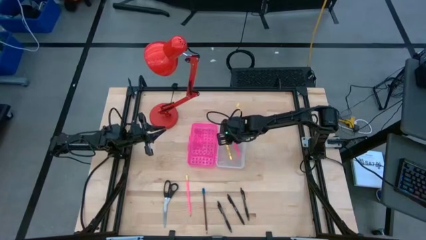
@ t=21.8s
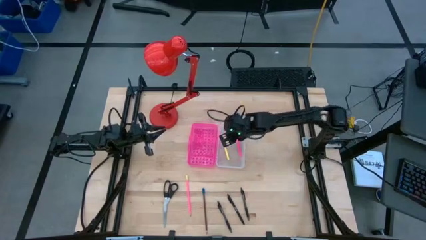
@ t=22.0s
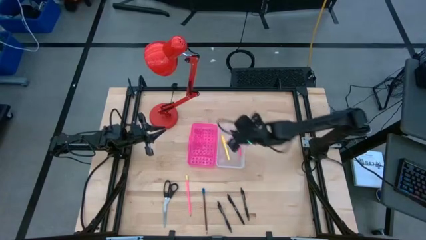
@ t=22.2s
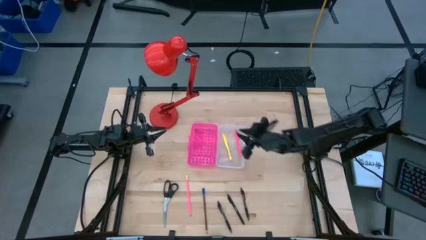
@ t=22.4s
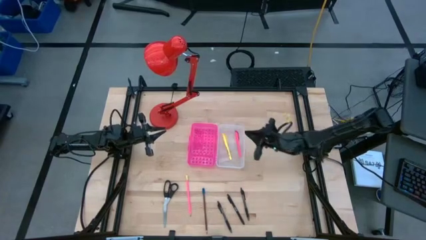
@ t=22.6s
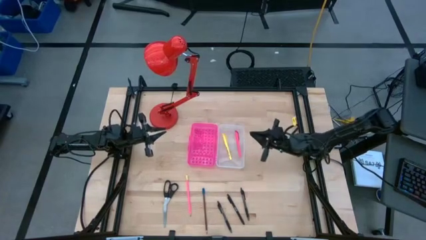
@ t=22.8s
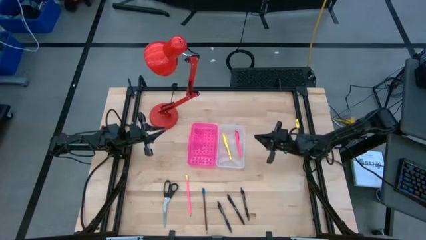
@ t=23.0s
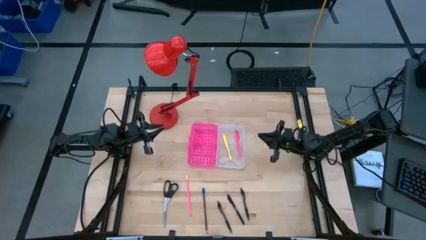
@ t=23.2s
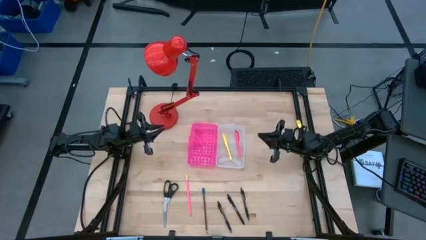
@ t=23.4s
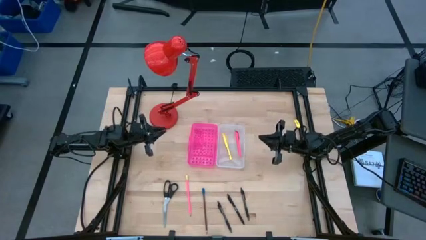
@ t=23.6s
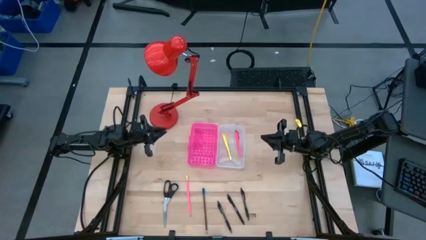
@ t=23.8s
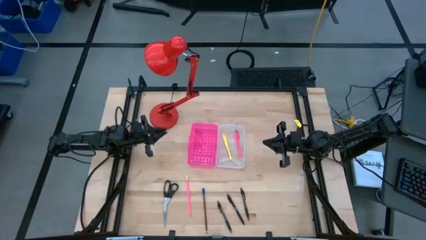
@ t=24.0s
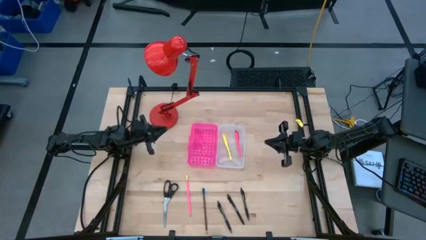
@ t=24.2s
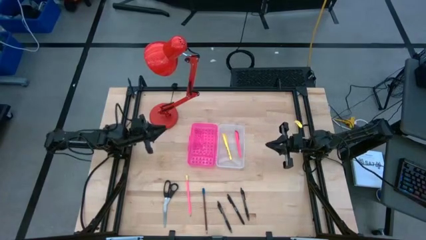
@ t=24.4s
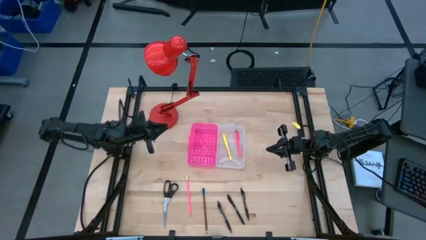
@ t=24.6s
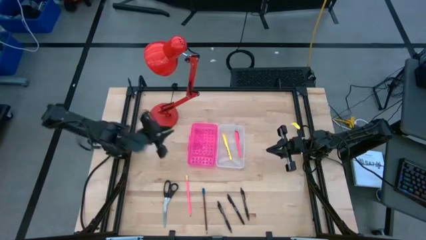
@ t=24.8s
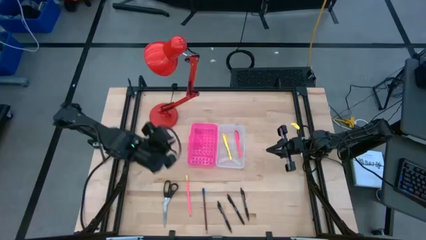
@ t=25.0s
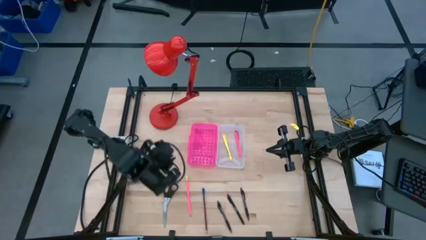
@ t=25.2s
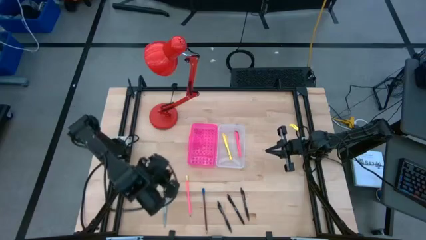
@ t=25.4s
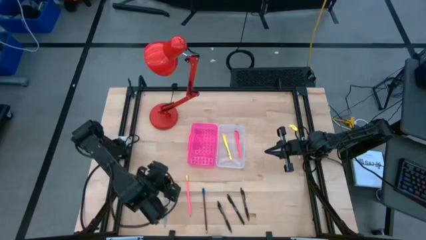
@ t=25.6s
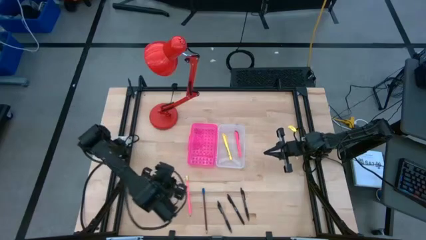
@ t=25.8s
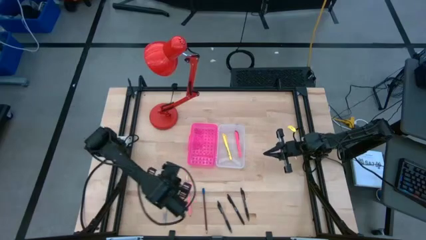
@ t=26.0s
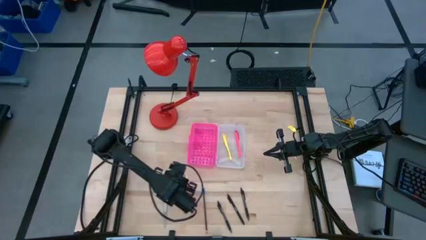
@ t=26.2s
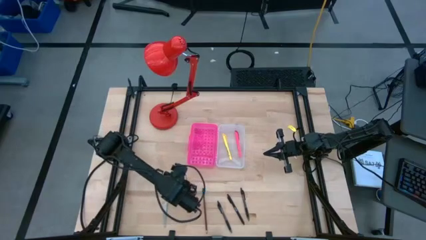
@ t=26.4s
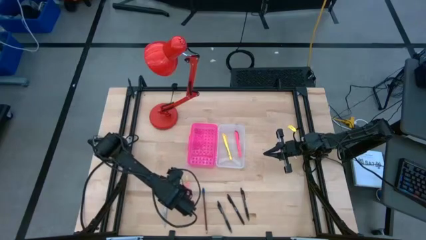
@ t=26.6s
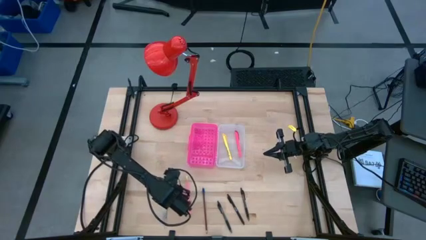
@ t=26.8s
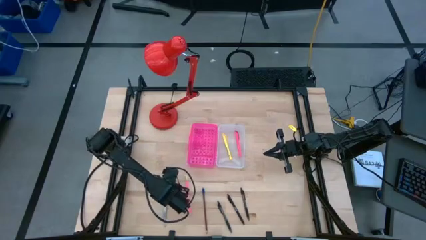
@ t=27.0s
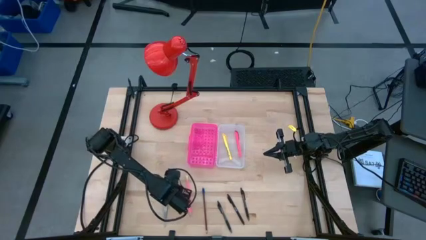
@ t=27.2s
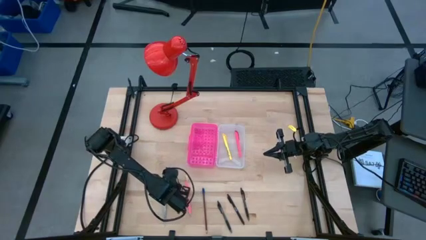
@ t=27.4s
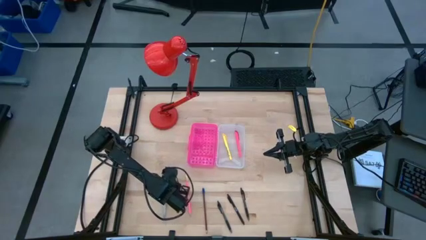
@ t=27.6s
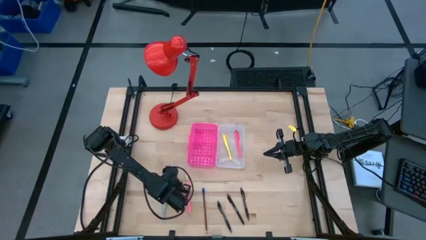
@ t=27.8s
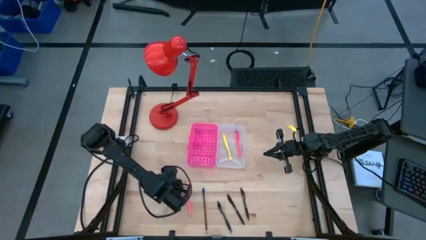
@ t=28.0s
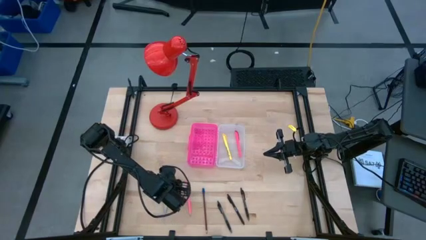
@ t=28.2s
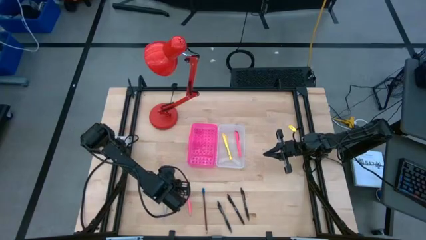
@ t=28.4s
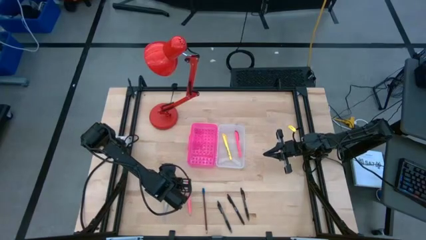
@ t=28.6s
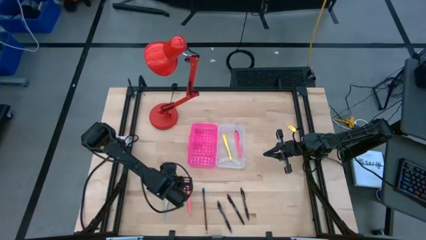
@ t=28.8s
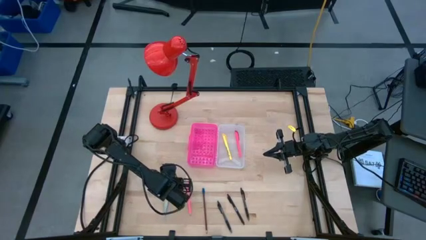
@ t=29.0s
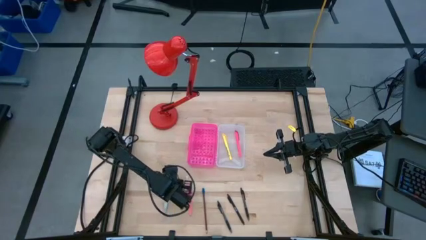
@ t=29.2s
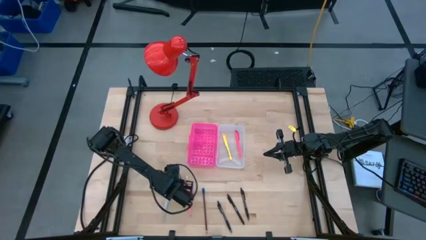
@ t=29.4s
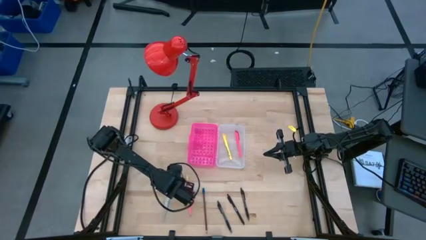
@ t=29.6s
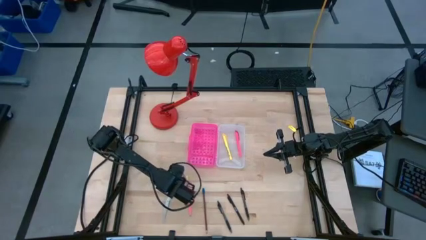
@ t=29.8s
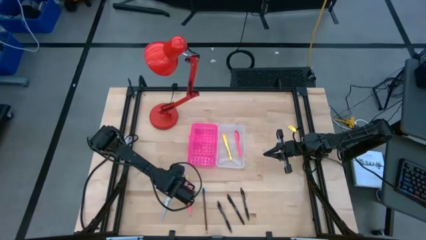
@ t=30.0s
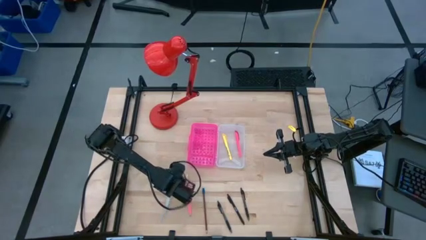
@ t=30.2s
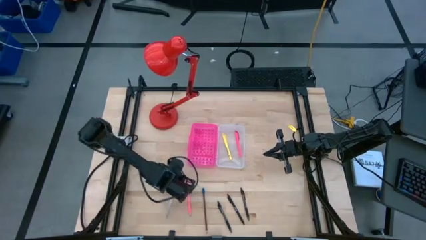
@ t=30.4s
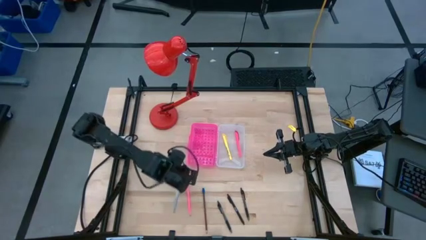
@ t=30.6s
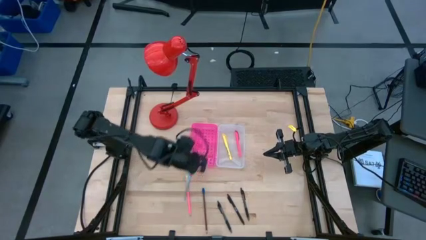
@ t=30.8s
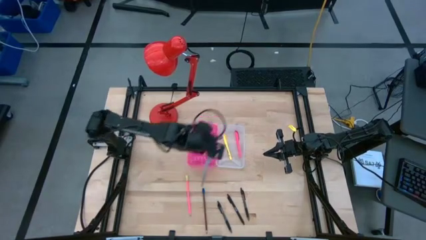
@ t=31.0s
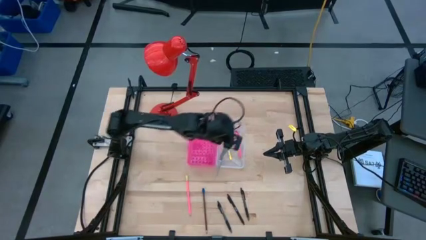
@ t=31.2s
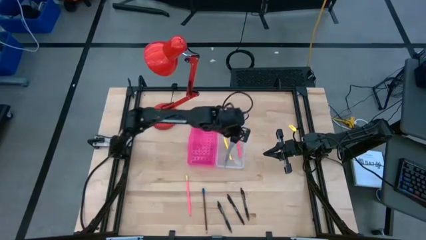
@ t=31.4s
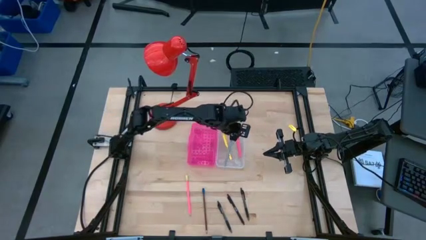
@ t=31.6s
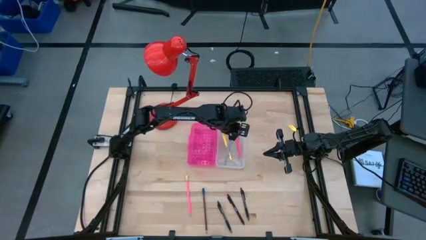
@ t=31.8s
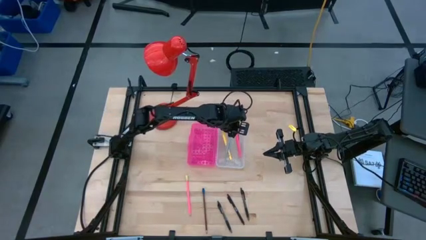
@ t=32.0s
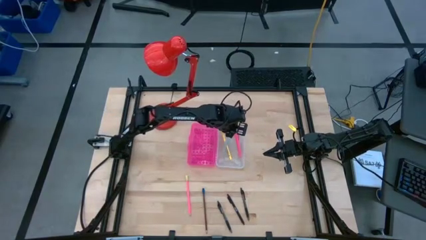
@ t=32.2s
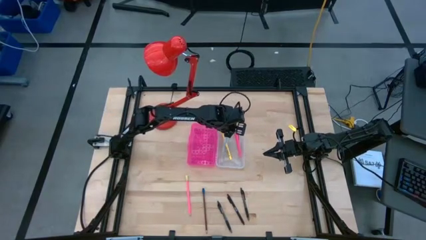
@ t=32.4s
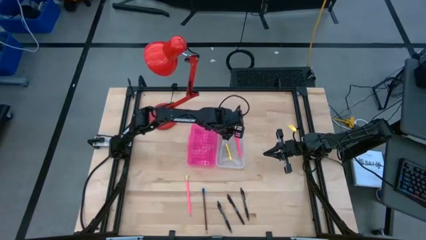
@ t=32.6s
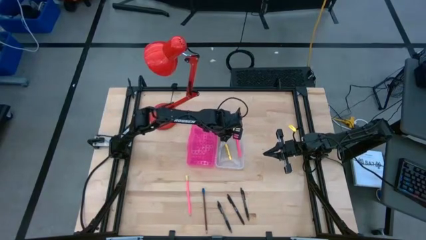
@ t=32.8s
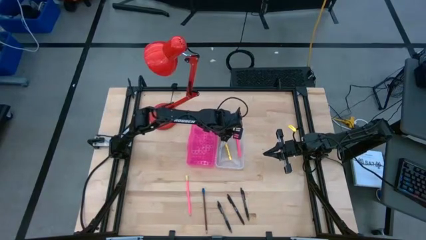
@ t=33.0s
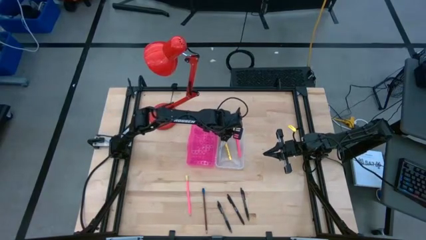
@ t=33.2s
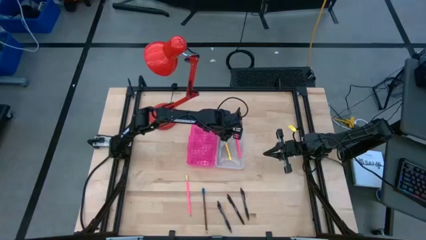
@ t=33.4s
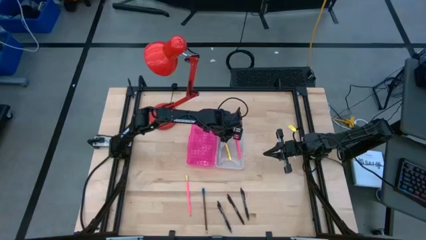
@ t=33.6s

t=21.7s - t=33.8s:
Task: Pick & place school supplies into a supply box
Put the scissors into the supply box

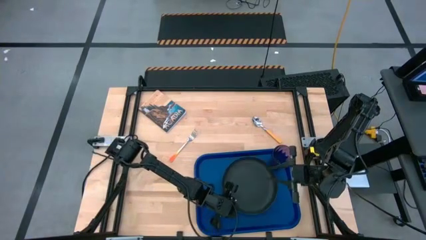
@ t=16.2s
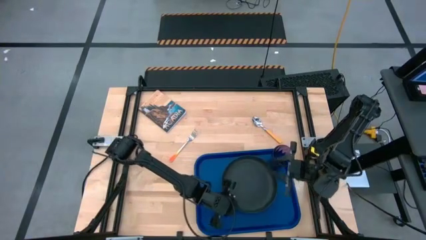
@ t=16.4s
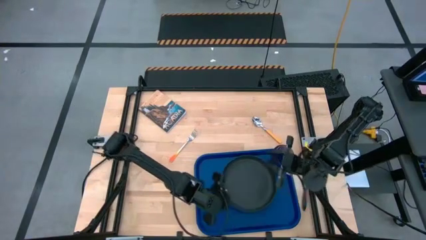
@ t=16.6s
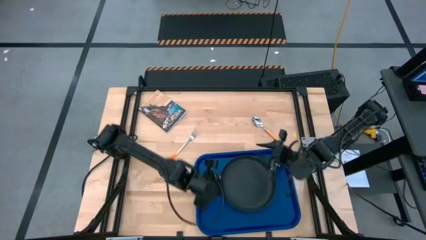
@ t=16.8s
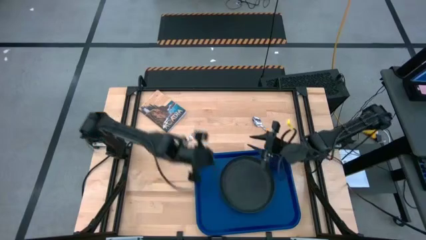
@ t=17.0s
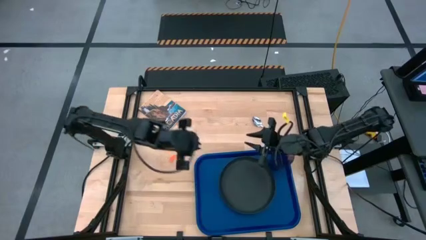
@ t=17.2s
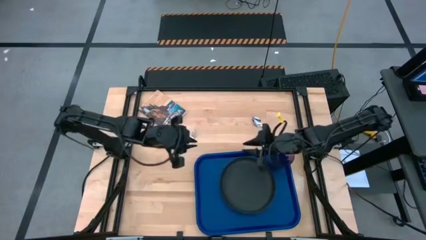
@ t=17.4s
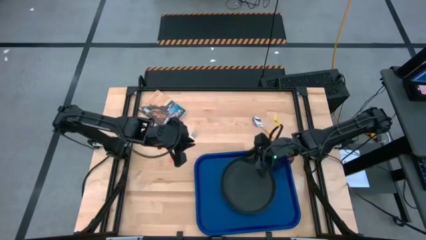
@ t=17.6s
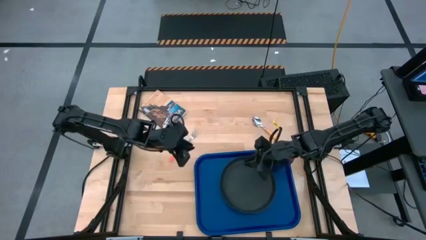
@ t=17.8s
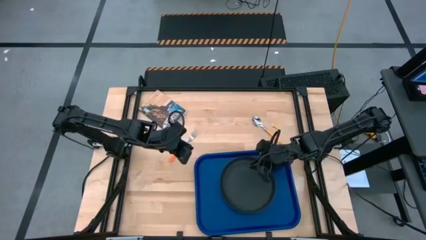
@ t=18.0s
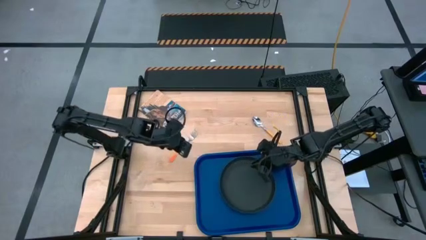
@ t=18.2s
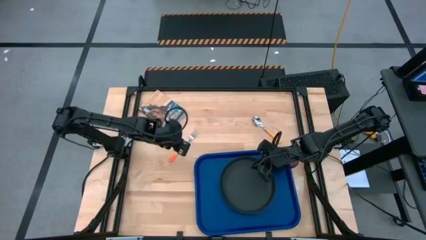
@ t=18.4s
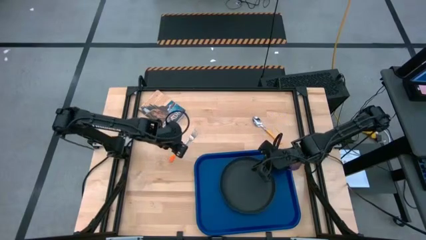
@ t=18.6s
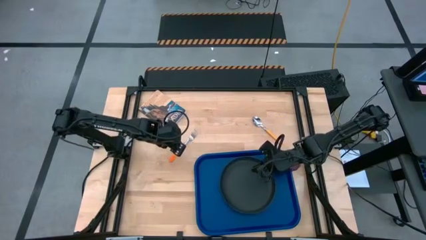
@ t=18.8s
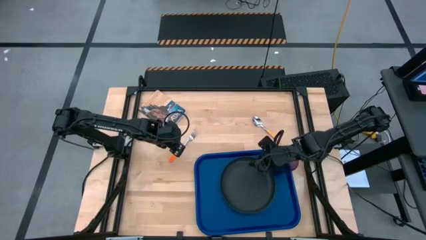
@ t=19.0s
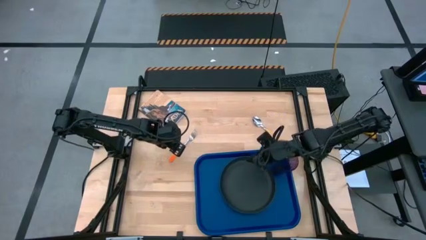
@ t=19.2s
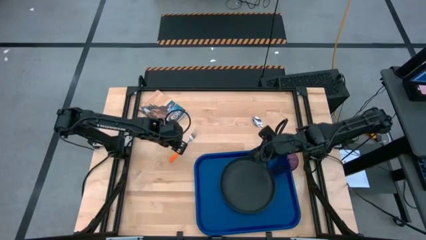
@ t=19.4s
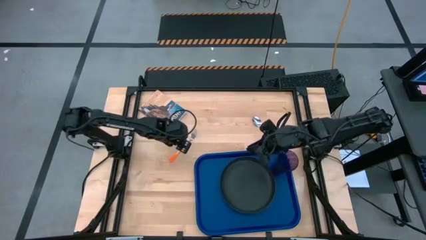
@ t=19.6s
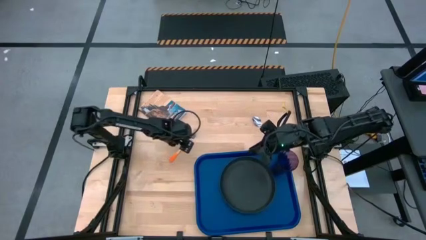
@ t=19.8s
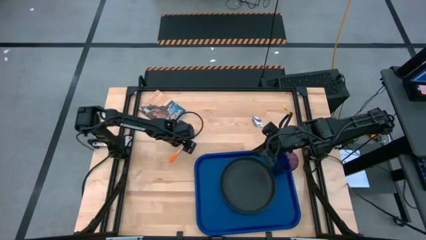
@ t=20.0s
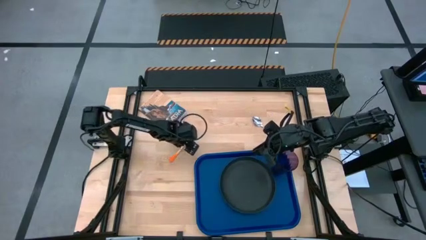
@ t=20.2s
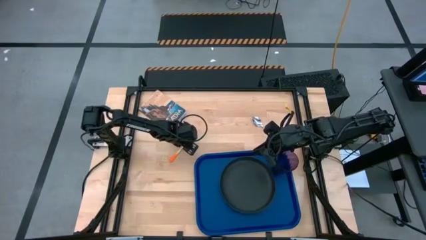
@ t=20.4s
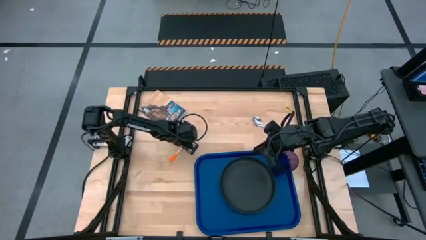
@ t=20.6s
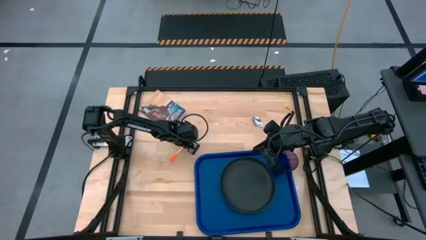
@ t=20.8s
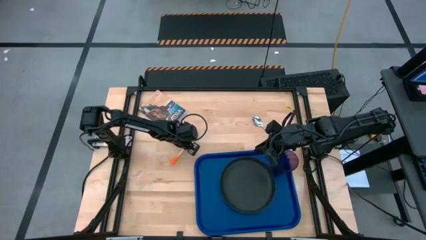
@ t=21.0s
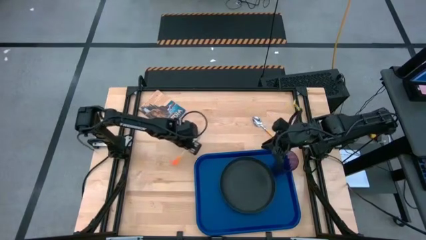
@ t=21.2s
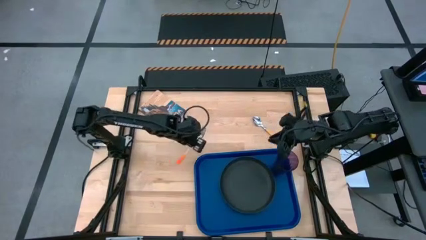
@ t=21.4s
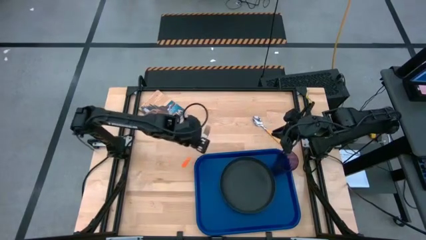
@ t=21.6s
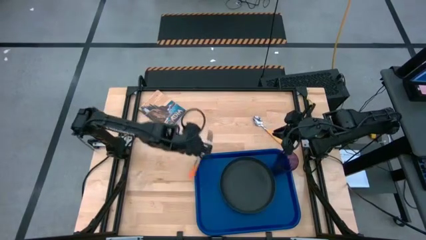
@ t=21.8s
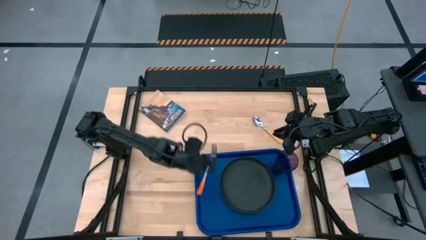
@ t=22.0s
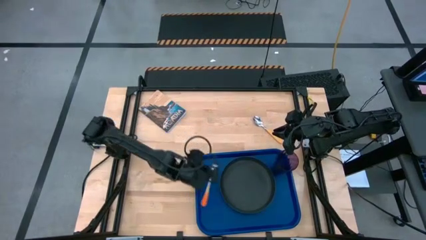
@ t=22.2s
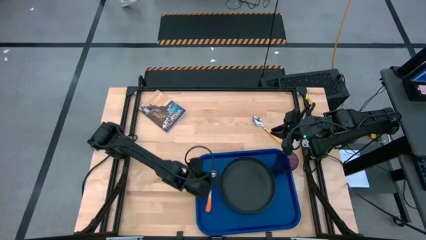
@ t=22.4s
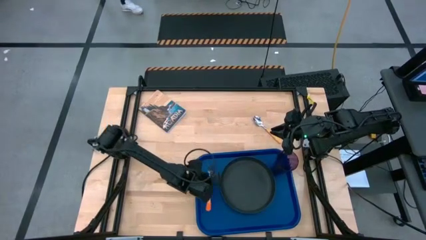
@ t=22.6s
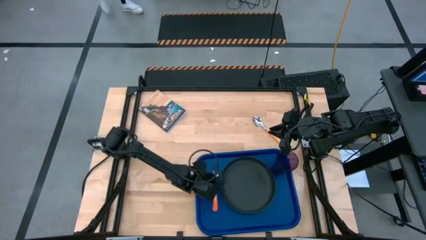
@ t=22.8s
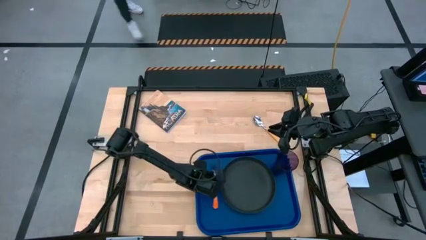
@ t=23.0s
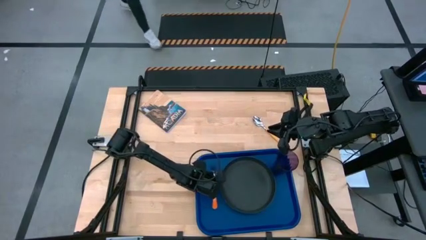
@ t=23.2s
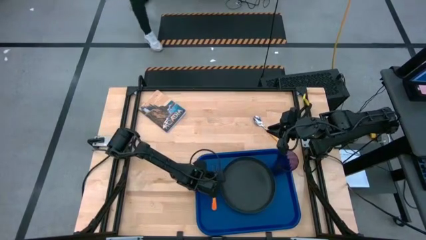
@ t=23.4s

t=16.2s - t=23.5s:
Task: Pick and place plate/cup/fork/spoon on tray
Put the orange fork to the left side of the black plate on the blue serving tray
